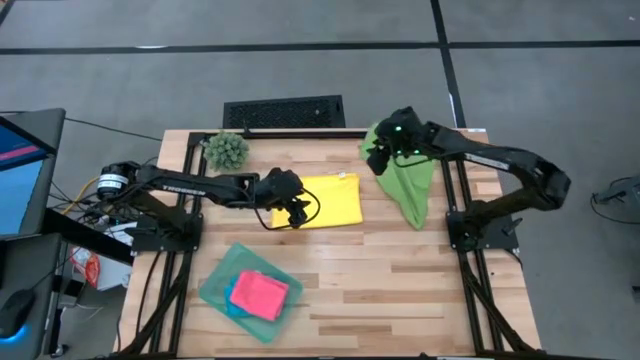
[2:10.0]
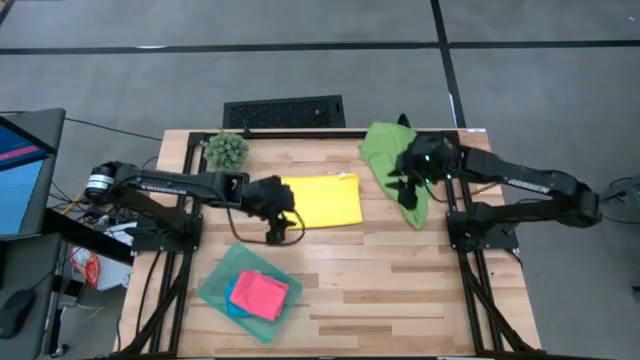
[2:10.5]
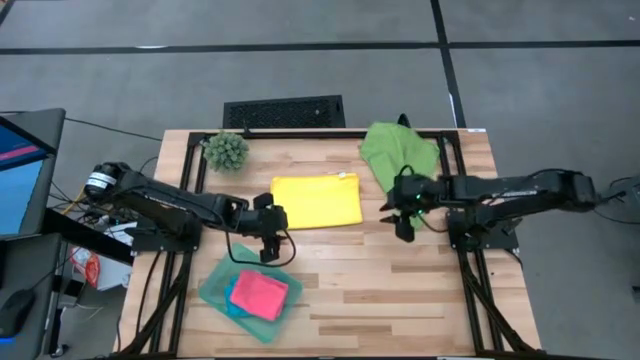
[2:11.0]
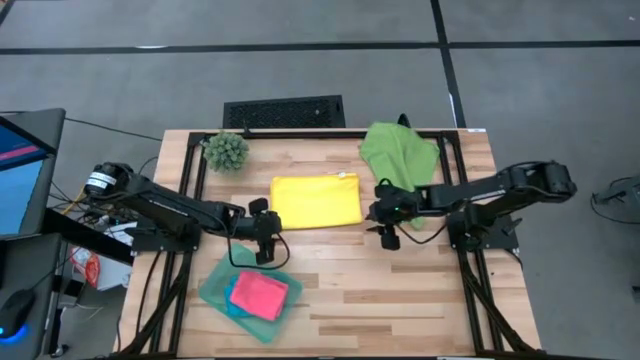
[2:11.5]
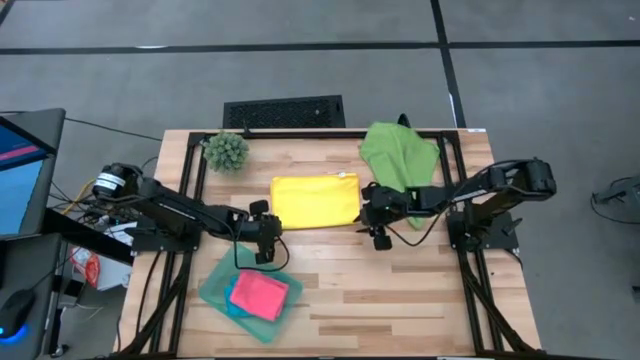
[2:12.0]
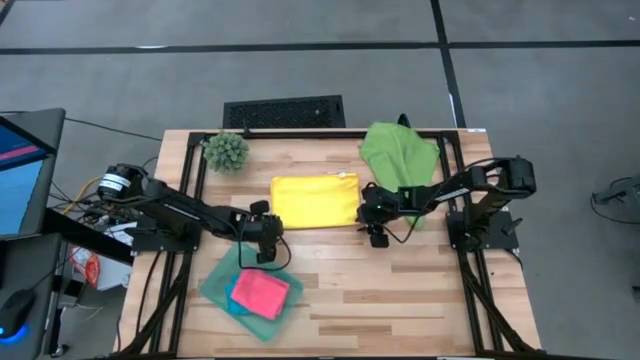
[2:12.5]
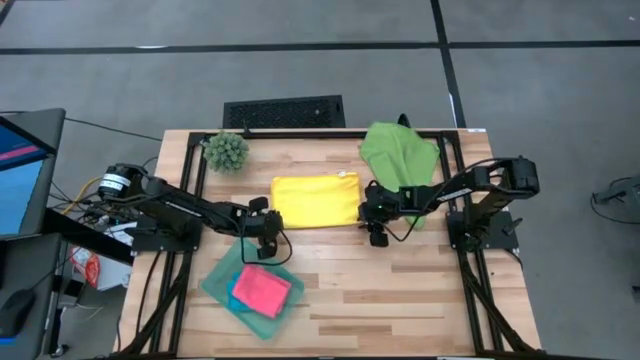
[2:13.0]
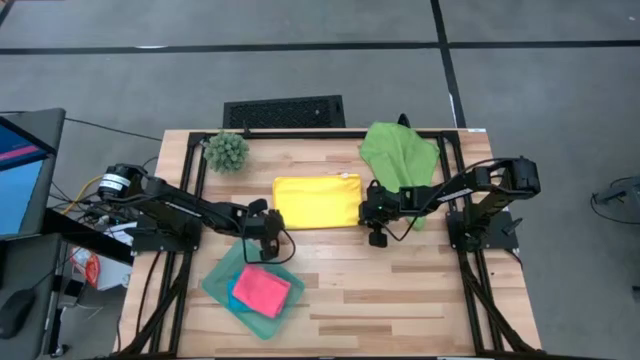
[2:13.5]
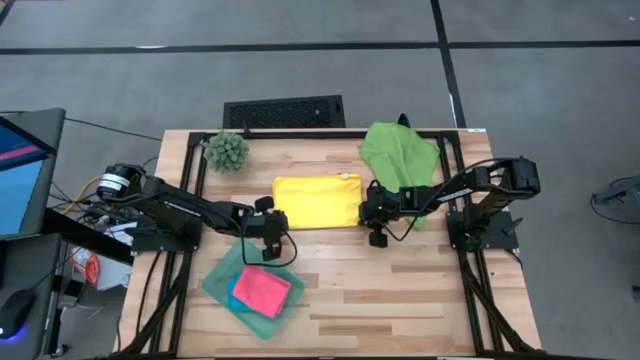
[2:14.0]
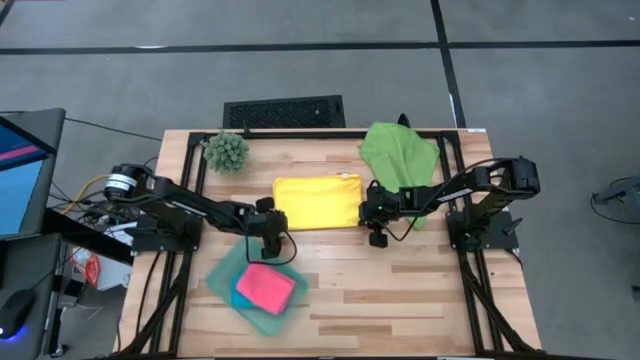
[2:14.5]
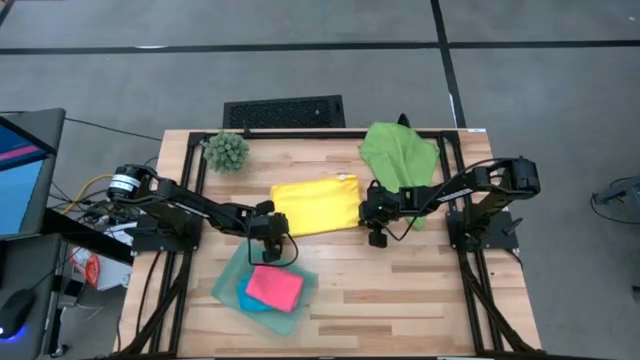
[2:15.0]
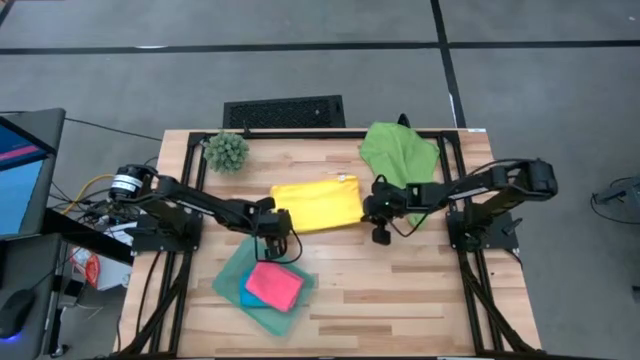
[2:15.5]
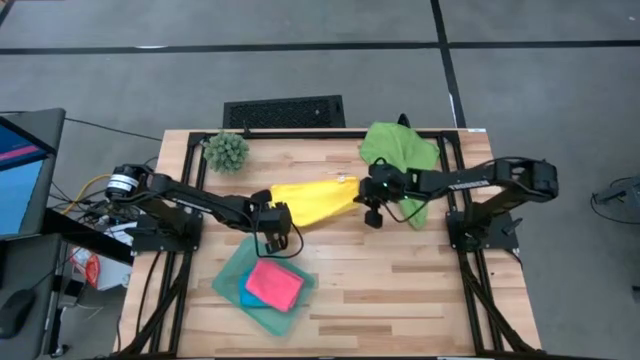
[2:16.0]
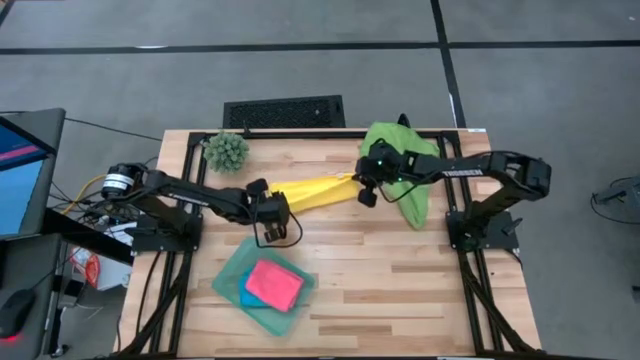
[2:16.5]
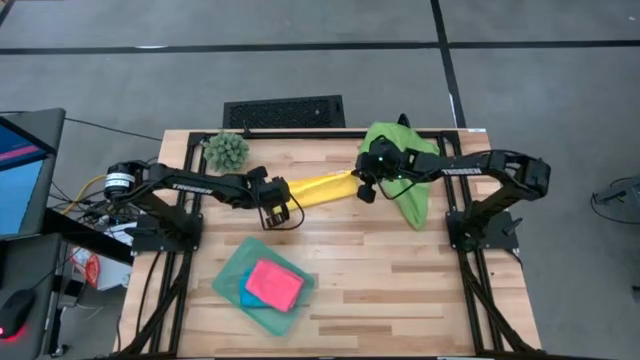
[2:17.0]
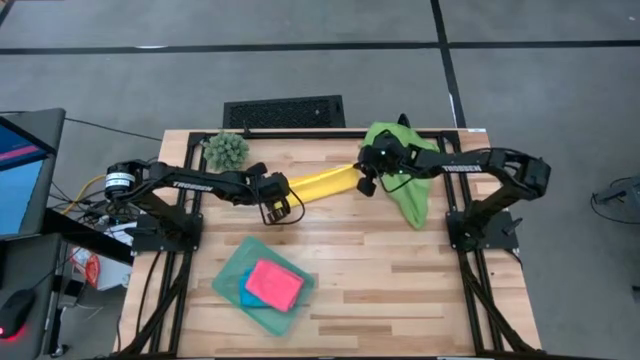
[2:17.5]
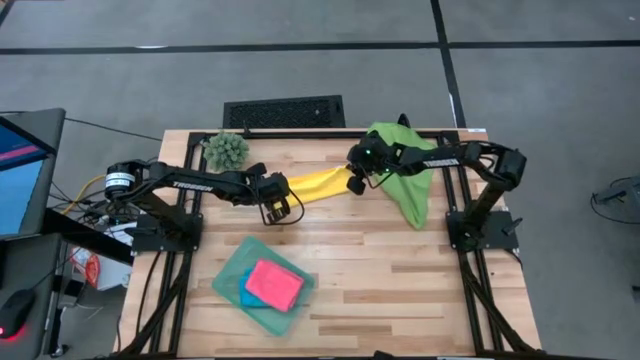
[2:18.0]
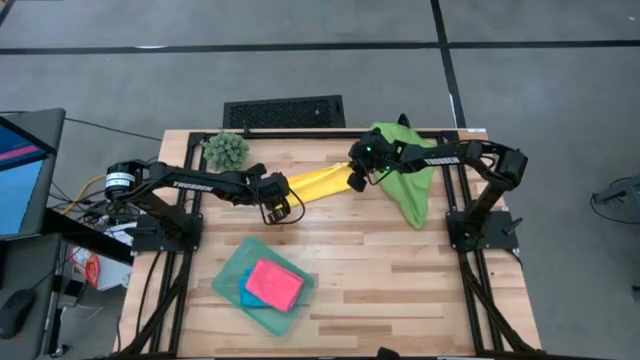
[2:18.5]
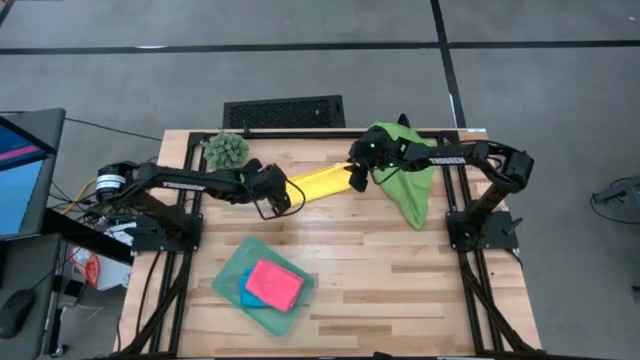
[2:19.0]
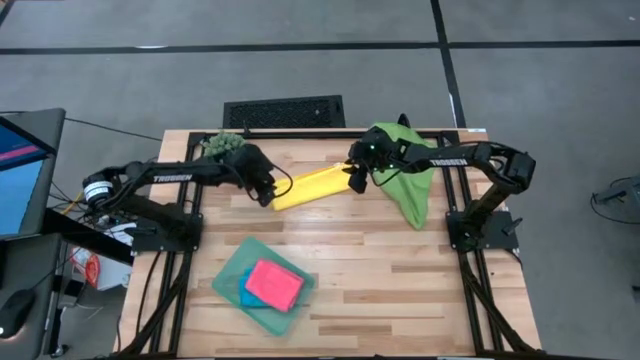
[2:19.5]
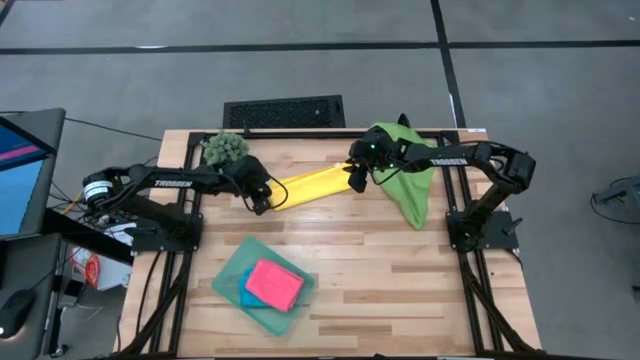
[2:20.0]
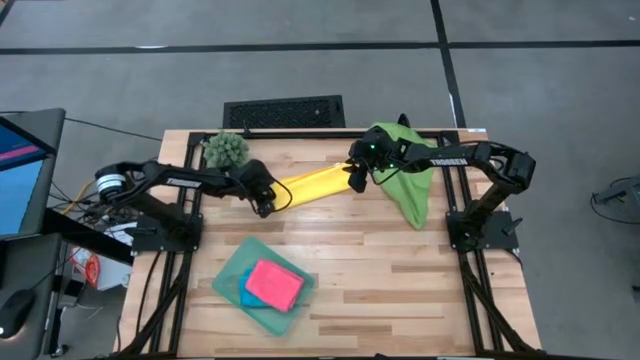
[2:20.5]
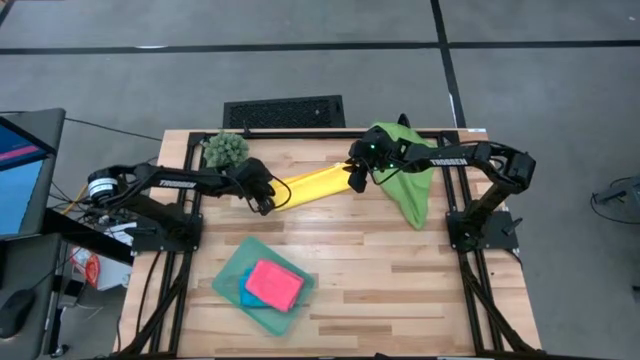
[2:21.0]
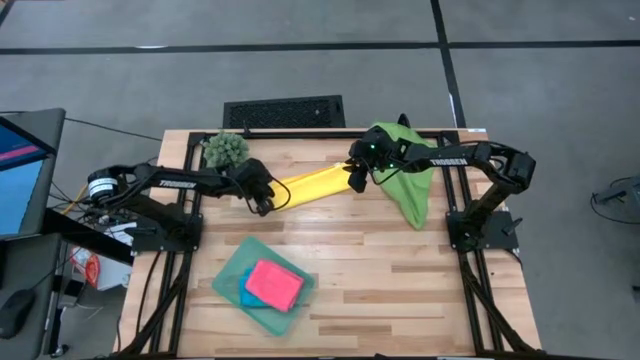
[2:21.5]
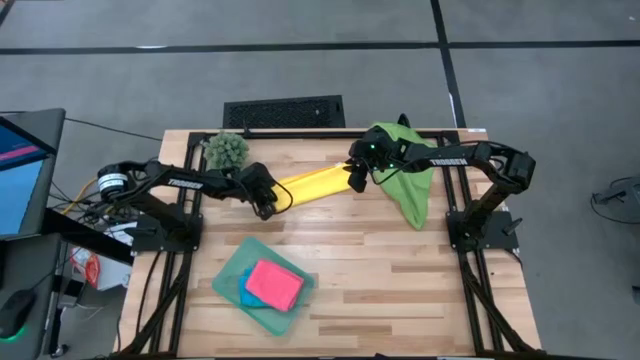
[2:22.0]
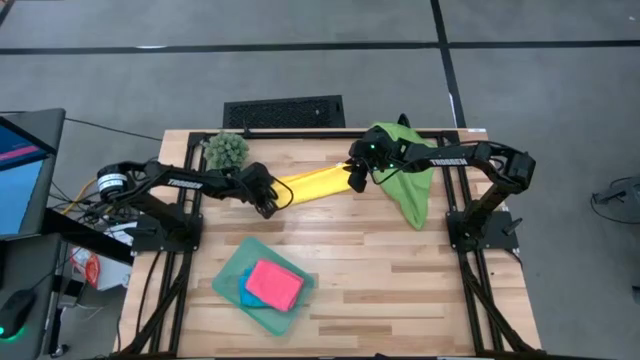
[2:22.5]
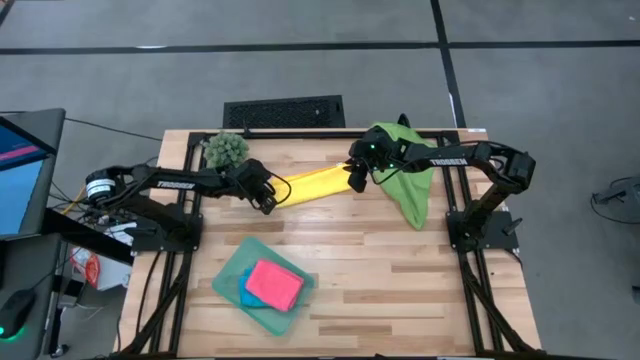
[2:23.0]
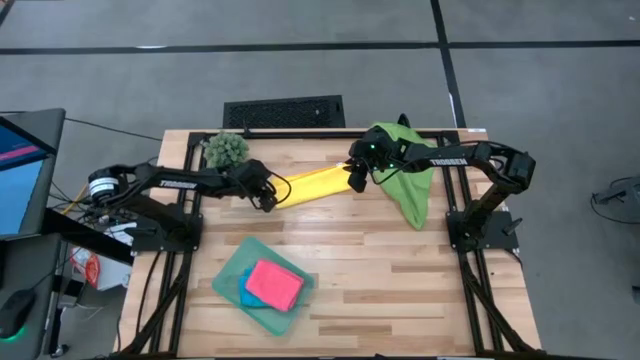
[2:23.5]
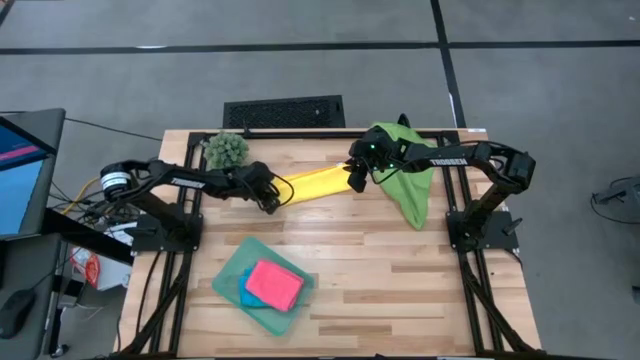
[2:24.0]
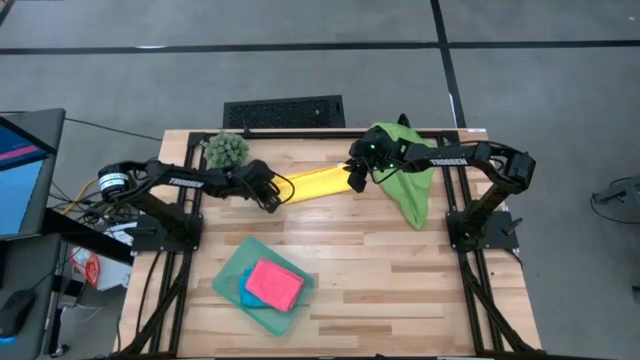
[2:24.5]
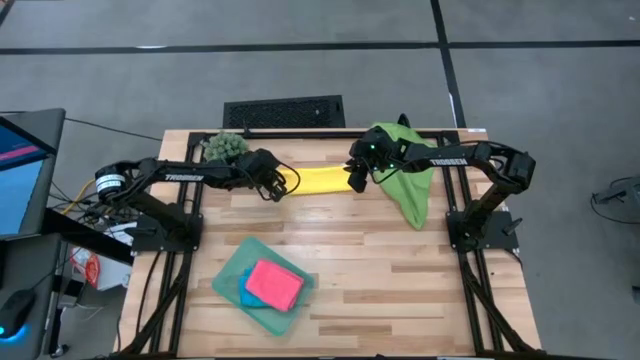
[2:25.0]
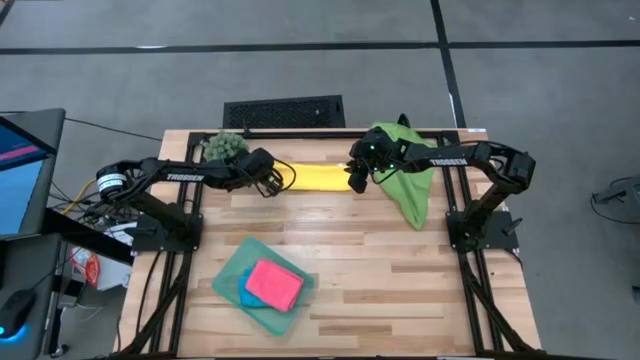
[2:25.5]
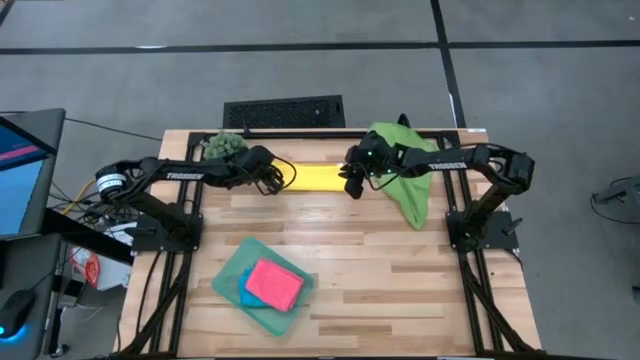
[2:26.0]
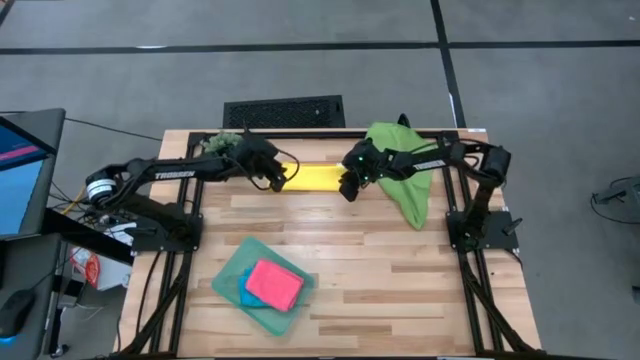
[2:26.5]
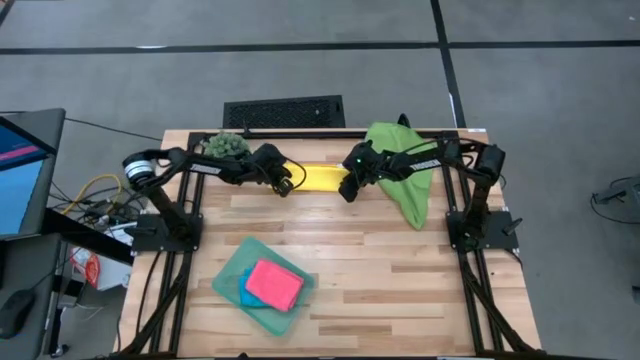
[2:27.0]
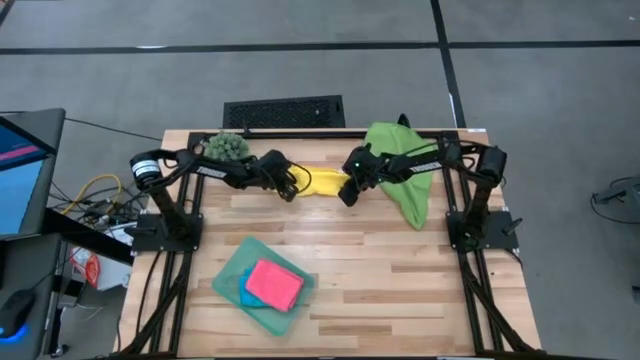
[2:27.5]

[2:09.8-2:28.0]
Task: Fold microfiber towels
Fold the yellow microfiber towel
